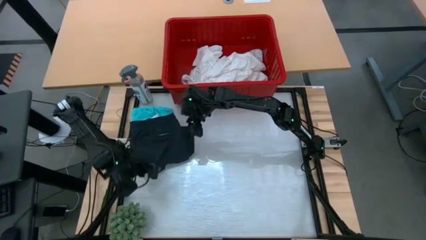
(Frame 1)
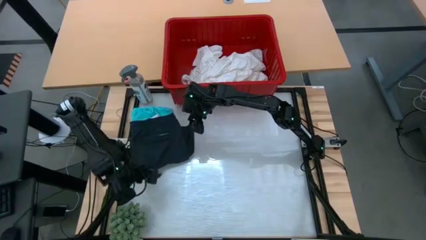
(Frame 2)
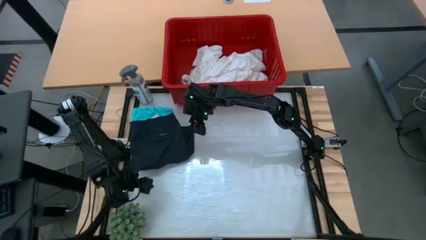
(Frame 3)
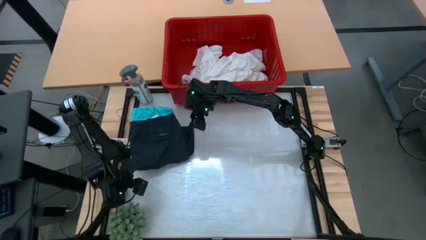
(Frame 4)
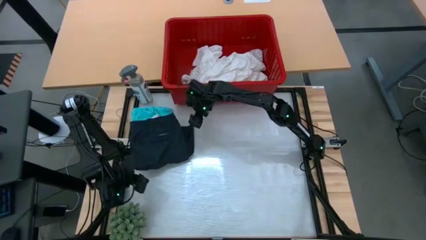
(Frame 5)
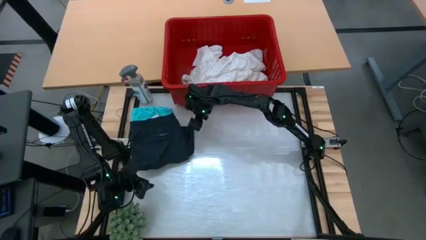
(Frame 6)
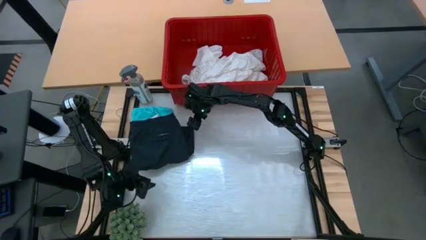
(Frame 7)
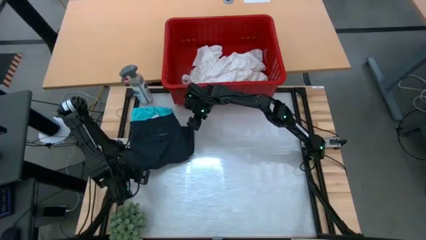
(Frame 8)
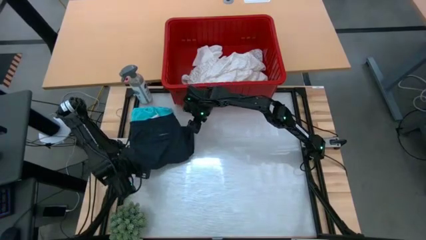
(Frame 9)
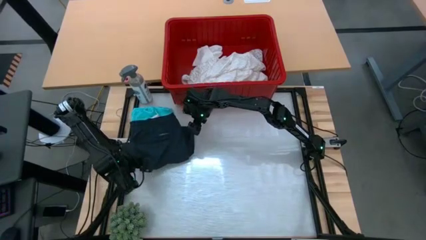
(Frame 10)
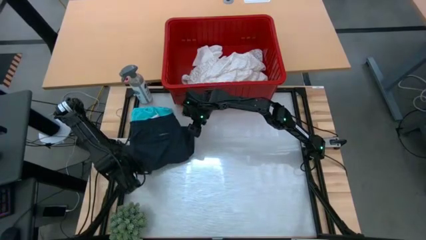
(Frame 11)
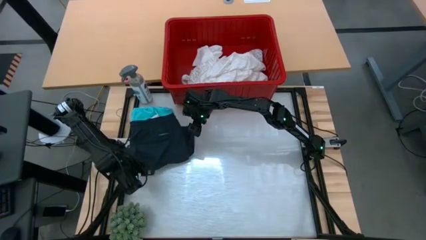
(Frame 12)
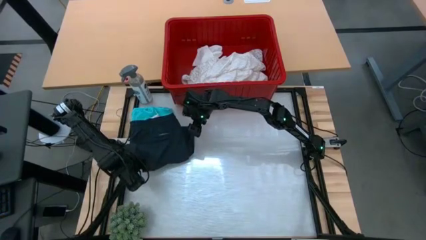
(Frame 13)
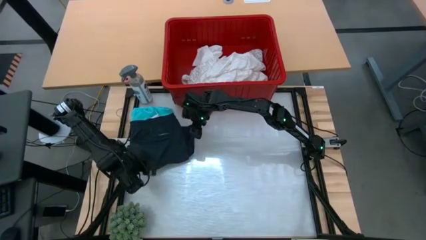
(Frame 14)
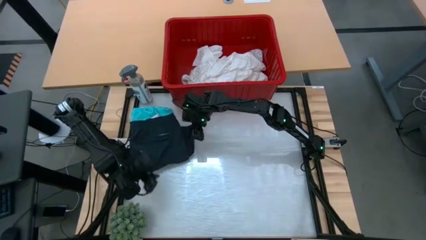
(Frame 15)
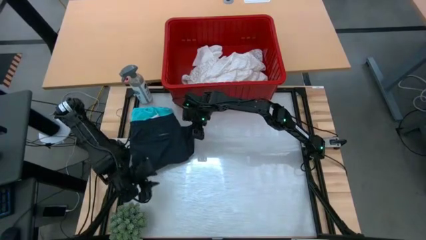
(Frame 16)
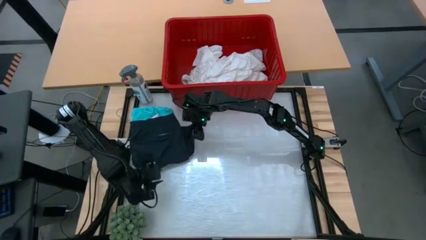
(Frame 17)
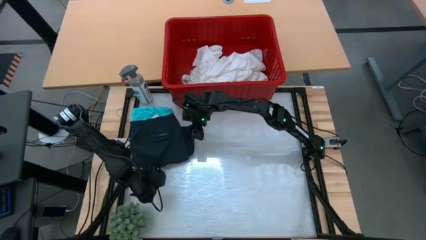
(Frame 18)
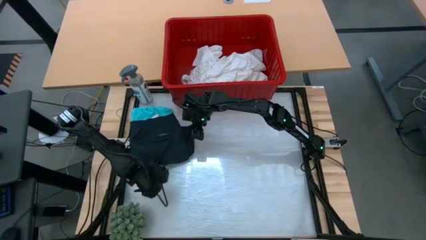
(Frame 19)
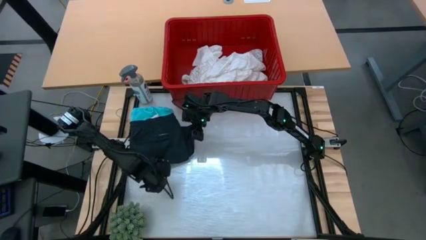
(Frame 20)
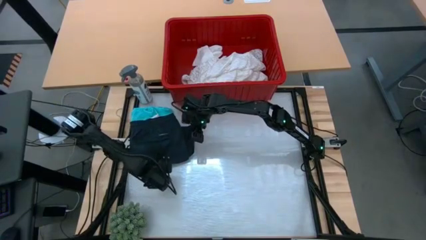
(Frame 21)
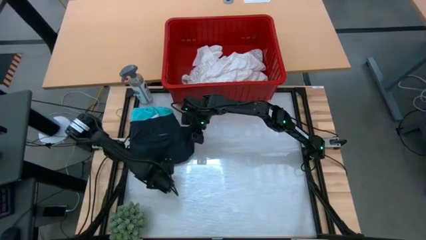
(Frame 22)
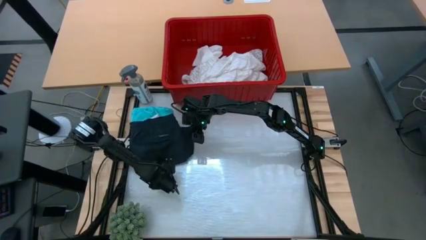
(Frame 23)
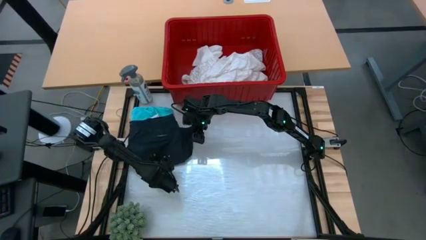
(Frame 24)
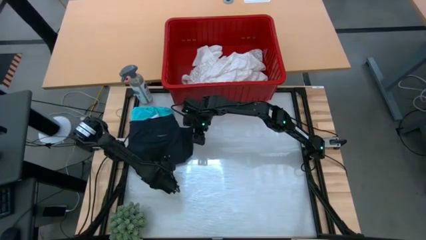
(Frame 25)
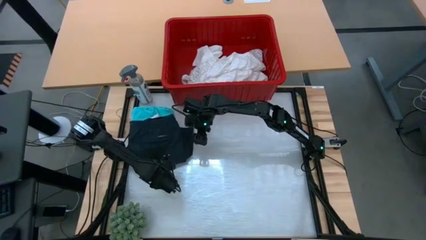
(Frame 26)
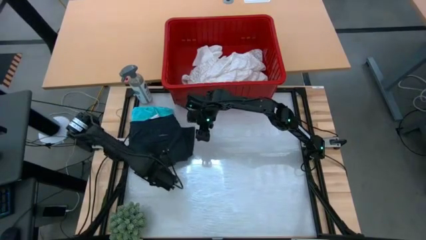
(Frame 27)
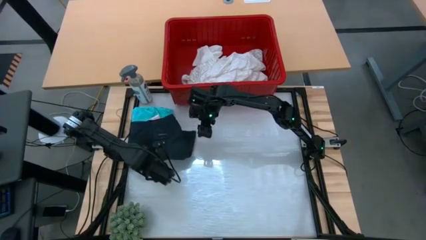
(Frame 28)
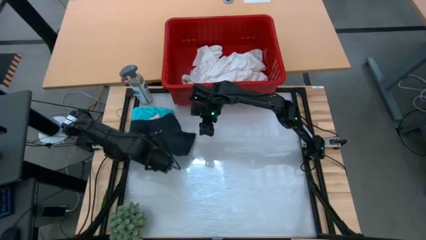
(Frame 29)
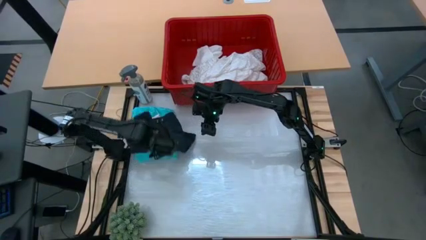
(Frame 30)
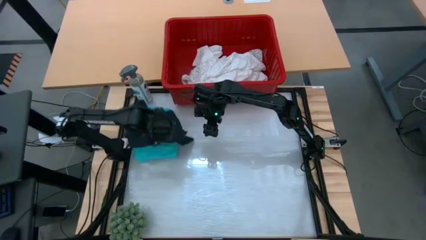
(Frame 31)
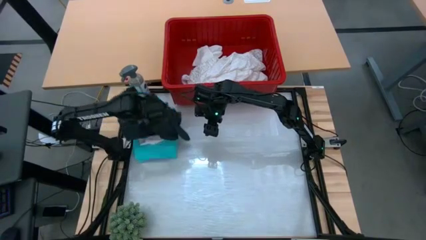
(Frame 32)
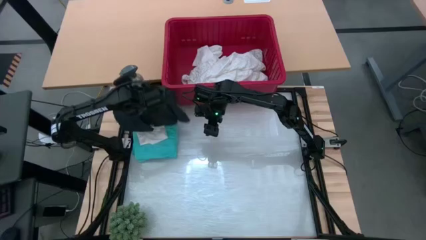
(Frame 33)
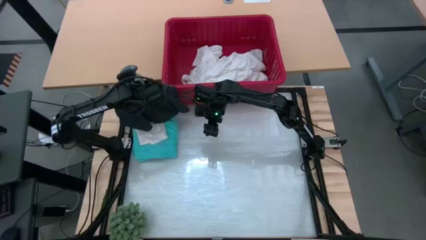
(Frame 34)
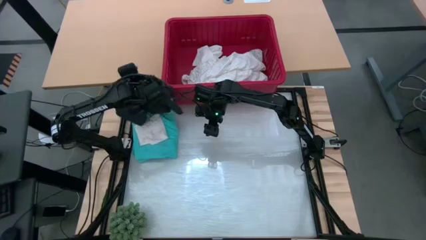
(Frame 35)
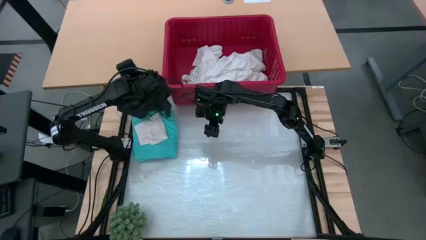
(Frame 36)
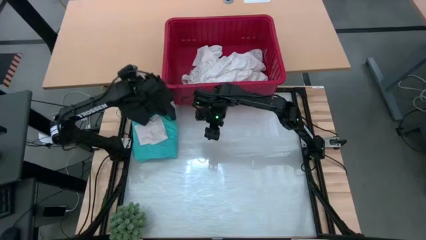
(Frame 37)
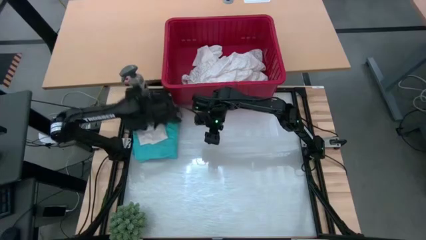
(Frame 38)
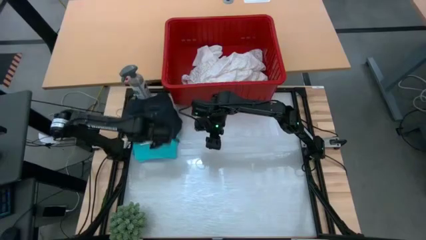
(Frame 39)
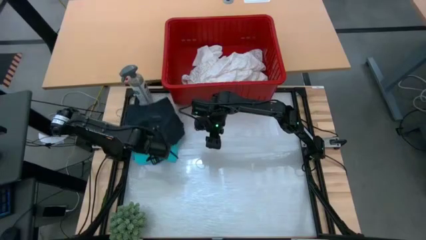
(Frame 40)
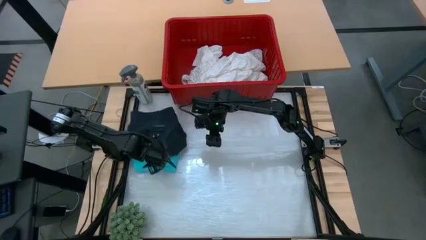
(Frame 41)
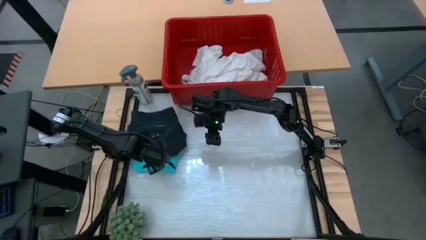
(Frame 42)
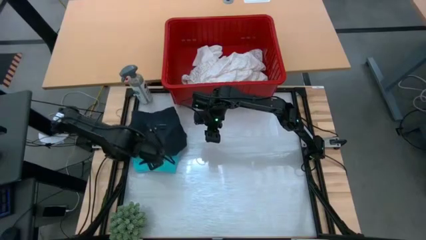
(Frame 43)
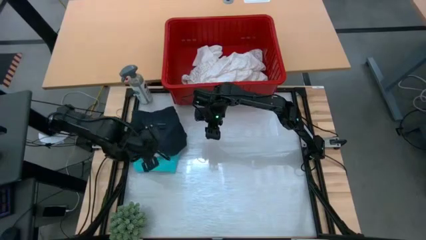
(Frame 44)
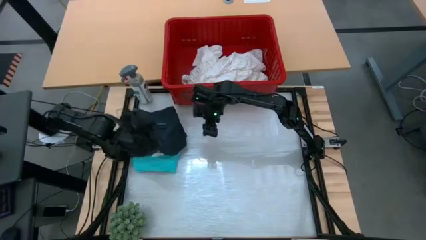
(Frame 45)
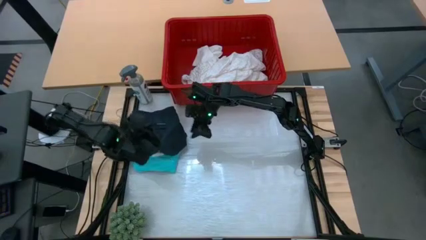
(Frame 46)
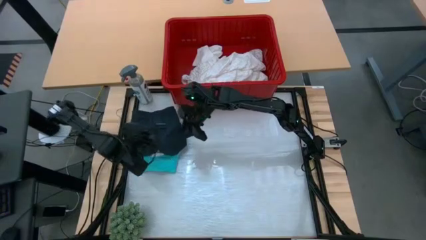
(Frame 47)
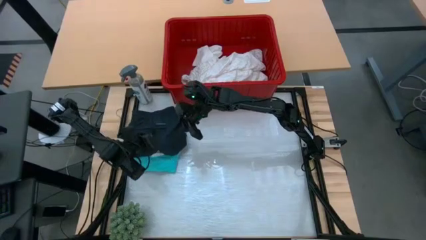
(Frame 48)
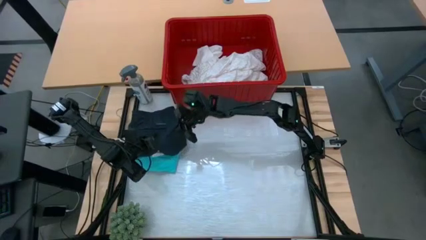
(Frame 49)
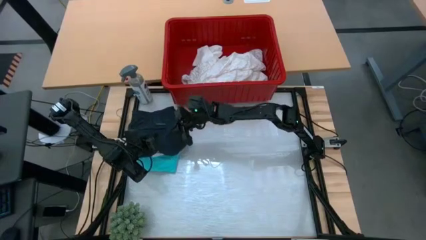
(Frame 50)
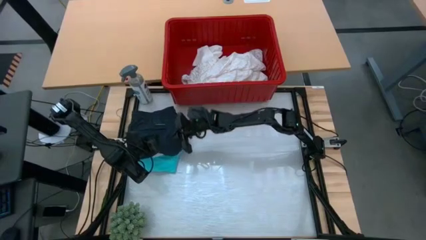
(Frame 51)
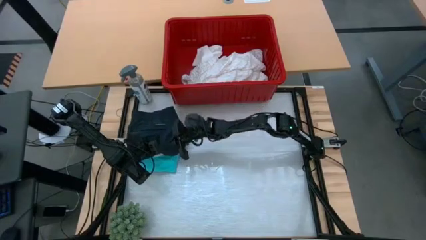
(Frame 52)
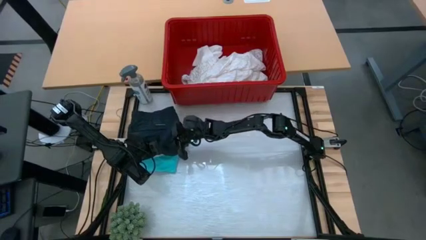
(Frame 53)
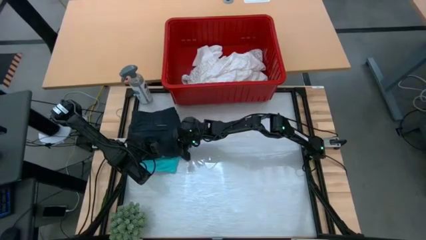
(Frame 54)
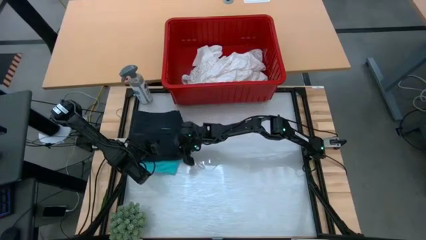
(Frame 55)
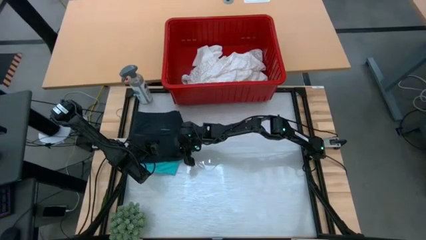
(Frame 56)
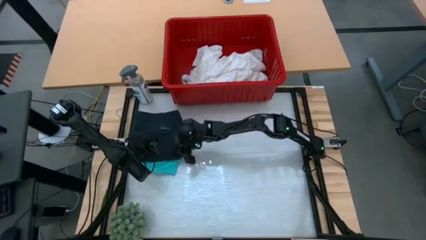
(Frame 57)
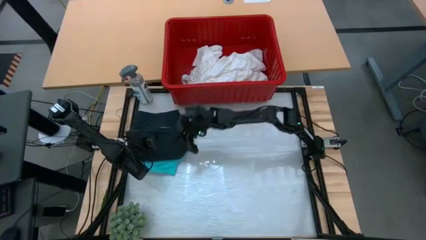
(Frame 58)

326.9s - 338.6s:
Task: Fold laundry
Stack the folded black shorts on top of the folded white underwear

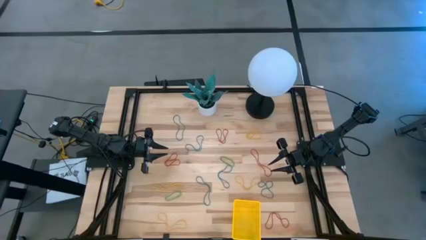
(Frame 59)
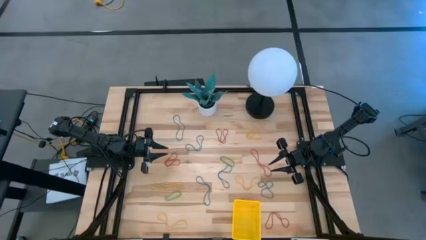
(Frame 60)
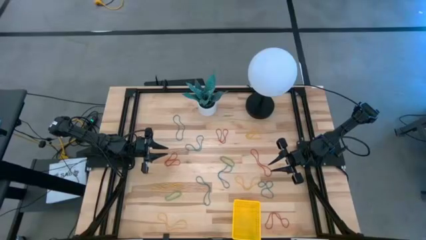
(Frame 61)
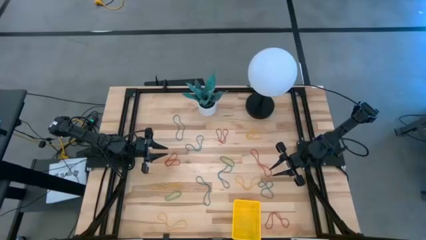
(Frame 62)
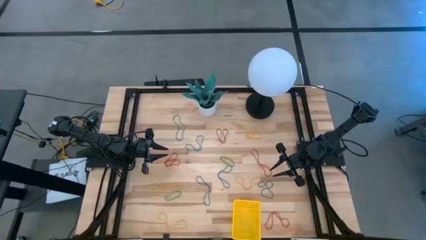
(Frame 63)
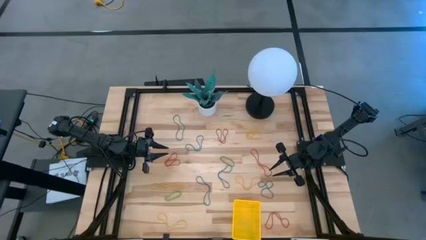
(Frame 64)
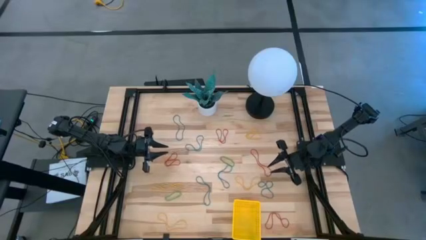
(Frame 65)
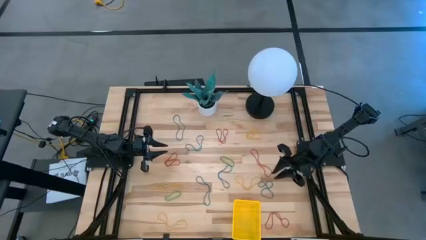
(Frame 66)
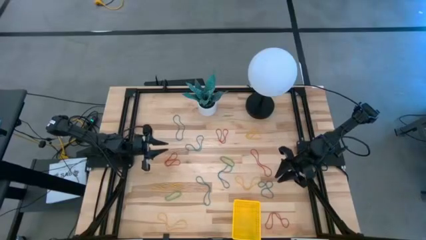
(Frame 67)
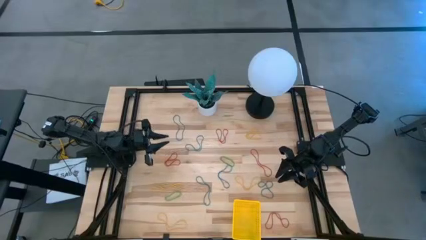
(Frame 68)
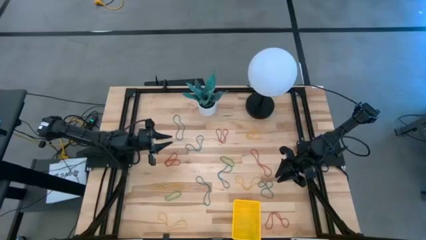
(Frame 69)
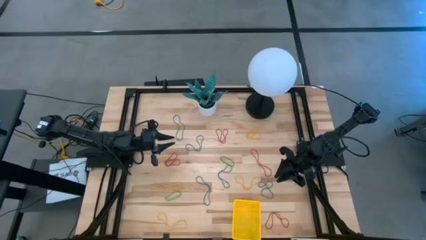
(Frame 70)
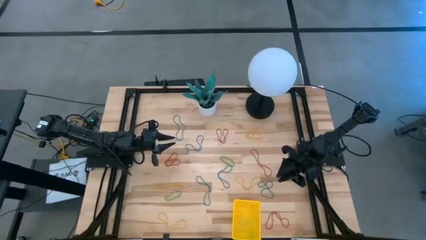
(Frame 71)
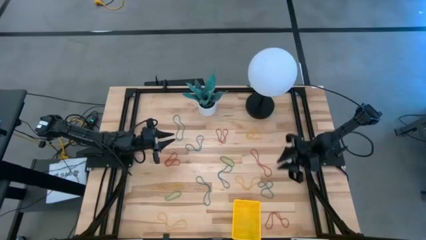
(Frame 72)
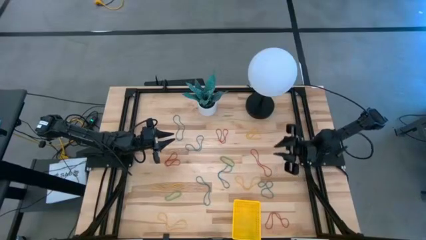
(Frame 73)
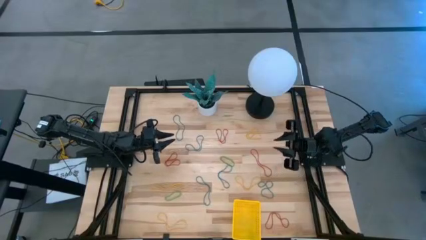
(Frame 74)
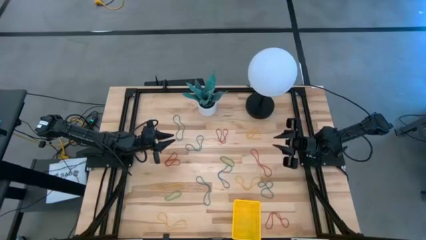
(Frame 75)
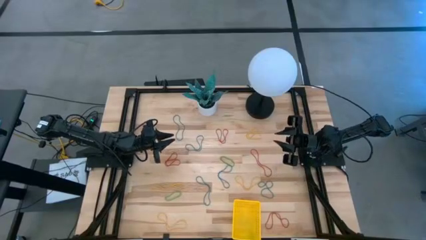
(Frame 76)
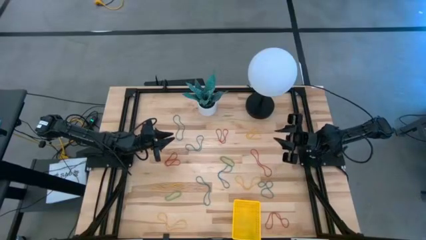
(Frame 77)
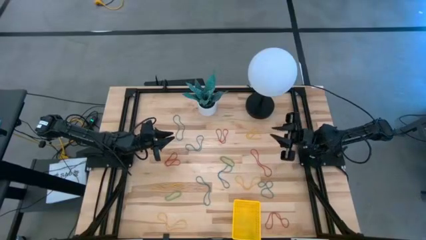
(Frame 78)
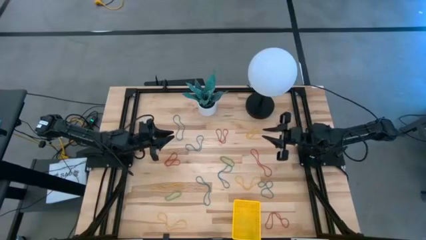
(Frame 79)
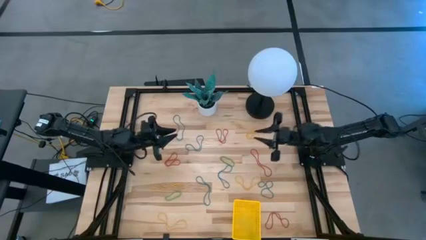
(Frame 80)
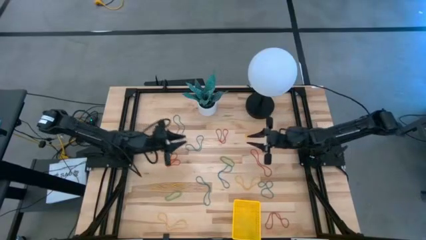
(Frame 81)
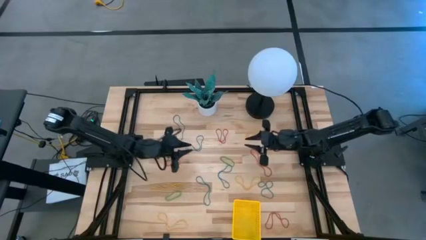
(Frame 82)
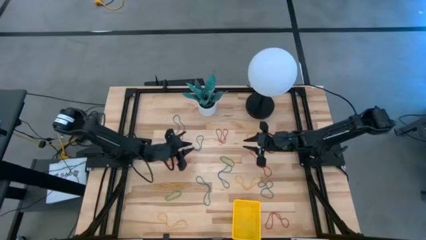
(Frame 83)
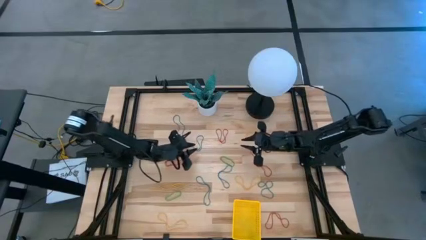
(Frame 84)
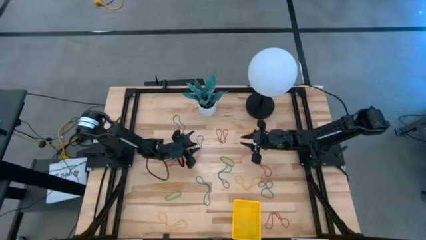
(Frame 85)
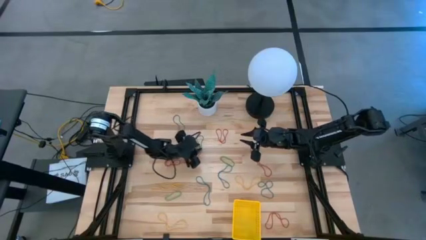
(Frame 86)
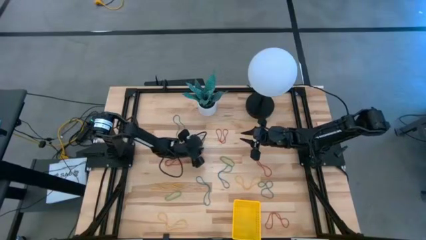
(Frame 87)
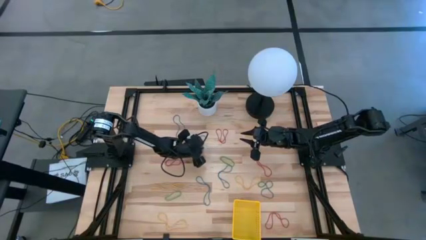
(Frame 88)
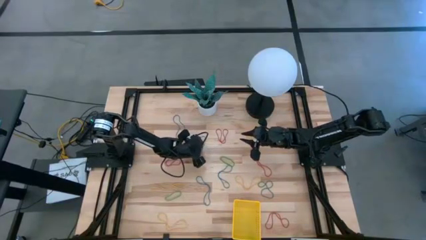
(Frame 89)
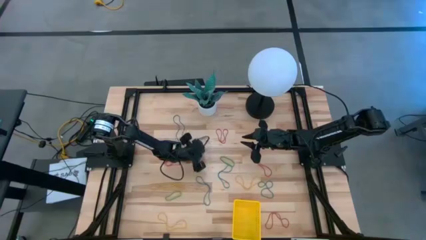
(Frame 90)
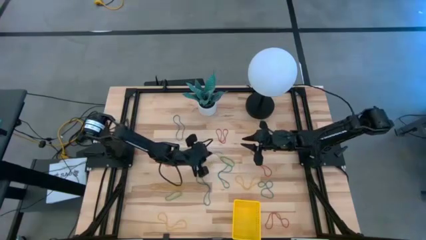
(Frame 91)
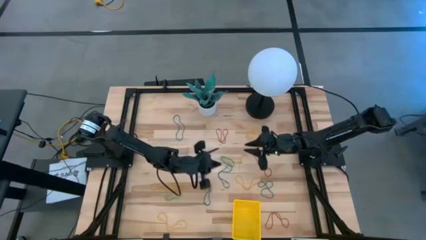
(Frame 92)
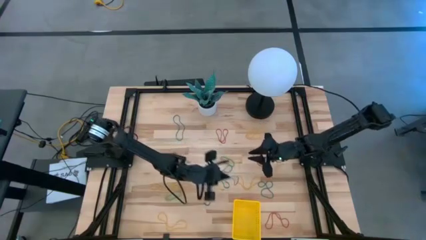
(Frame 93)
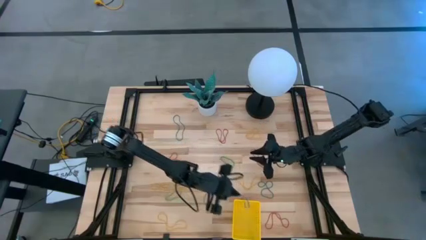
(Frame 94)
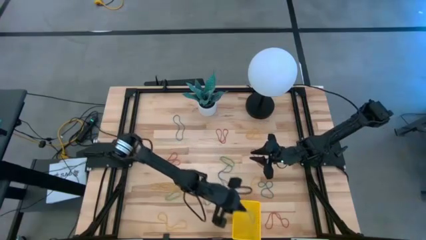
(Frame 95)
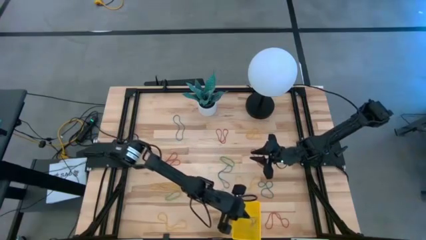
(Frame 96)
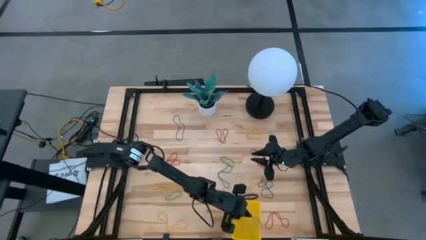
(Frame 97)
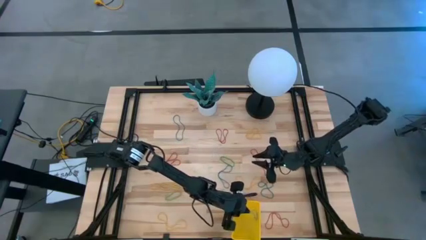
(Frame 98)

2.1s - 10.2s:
Task: Pick and place rubber bands into bin
Put the blue rubber band into the yellow basket
